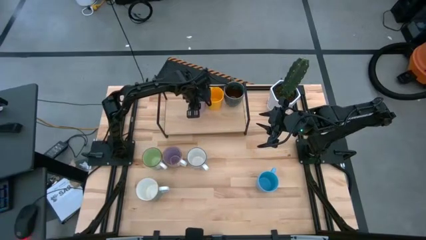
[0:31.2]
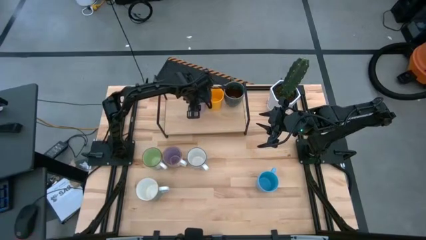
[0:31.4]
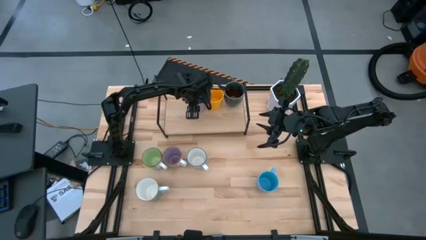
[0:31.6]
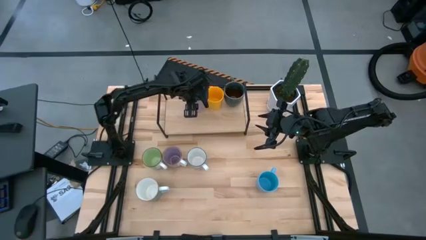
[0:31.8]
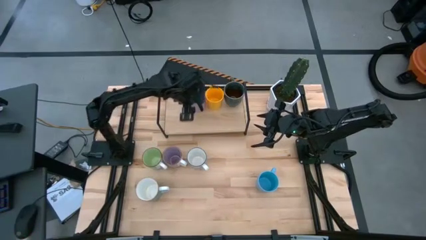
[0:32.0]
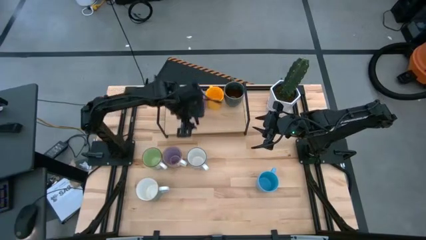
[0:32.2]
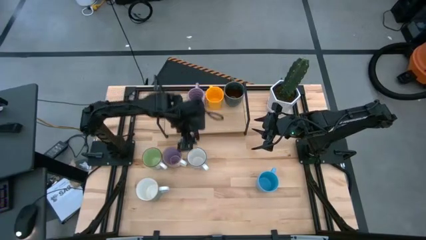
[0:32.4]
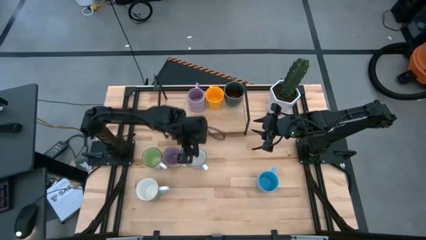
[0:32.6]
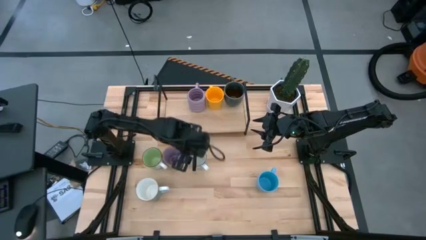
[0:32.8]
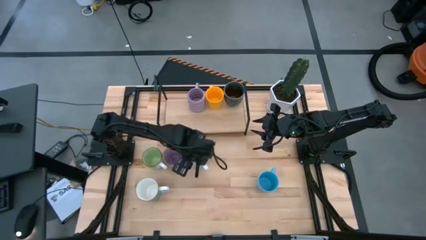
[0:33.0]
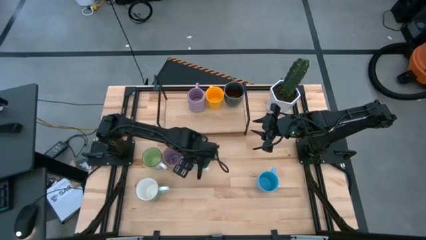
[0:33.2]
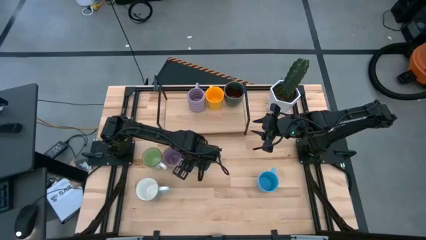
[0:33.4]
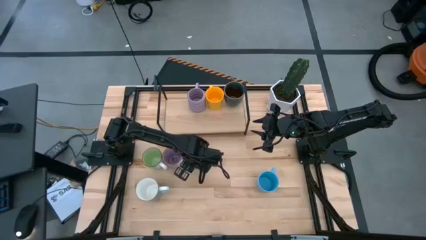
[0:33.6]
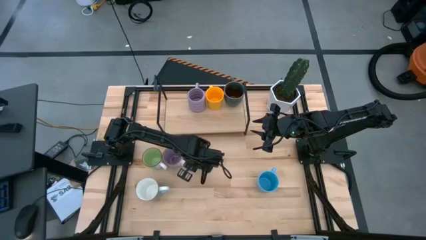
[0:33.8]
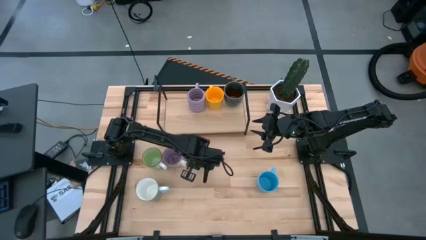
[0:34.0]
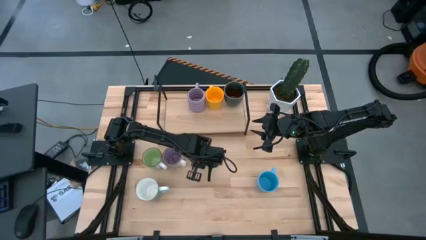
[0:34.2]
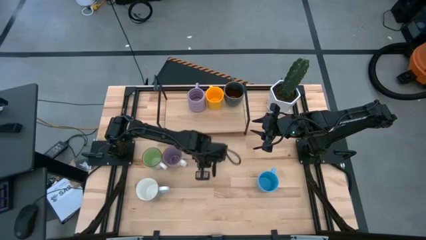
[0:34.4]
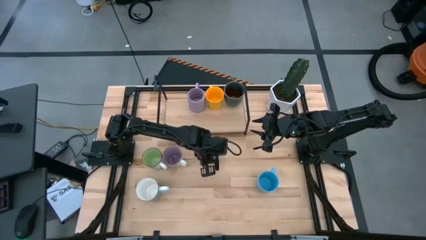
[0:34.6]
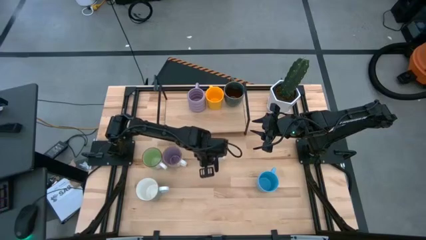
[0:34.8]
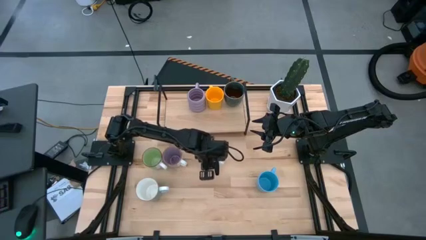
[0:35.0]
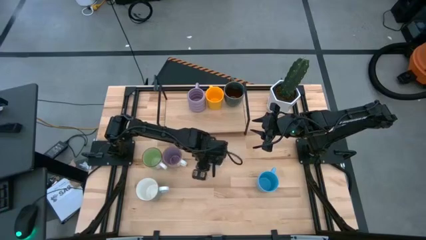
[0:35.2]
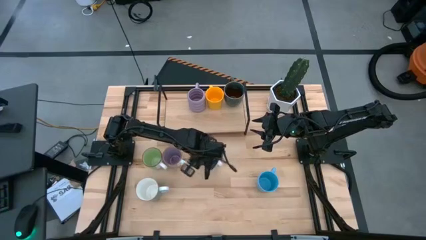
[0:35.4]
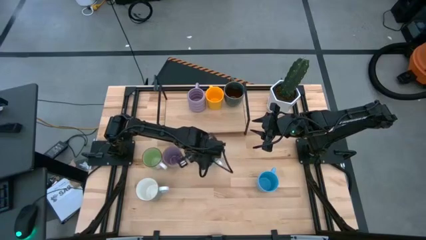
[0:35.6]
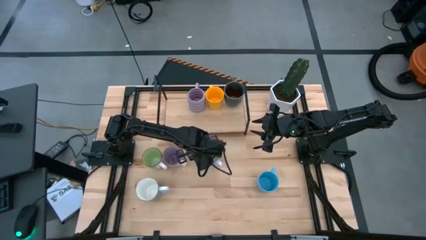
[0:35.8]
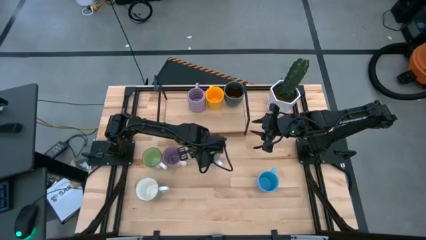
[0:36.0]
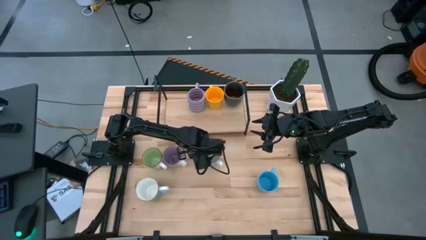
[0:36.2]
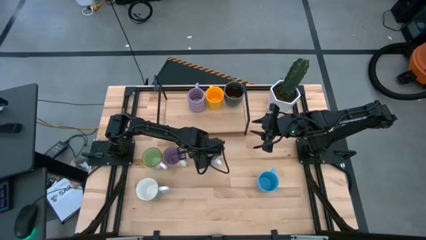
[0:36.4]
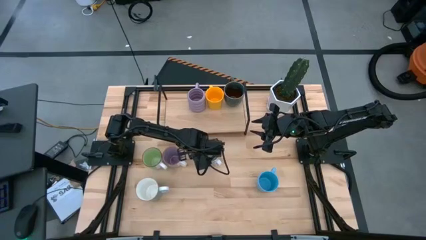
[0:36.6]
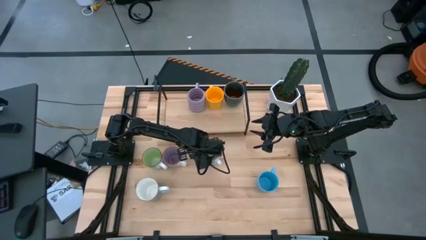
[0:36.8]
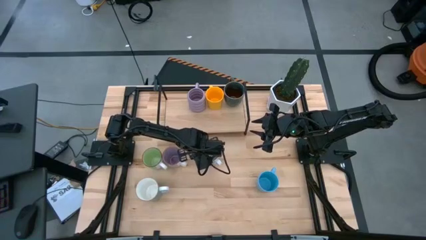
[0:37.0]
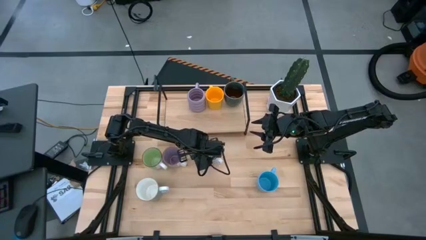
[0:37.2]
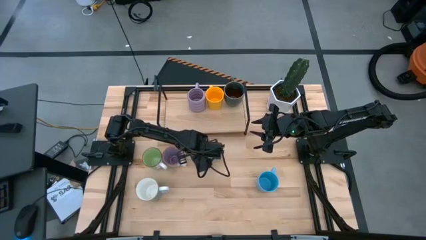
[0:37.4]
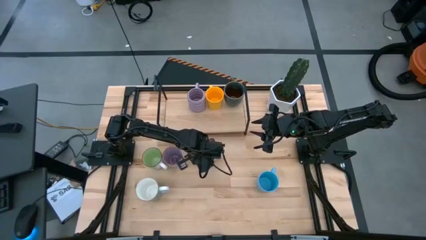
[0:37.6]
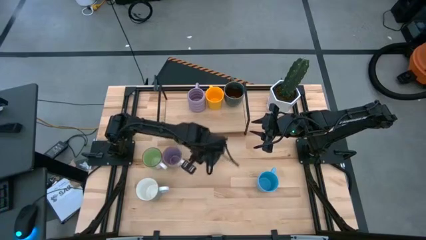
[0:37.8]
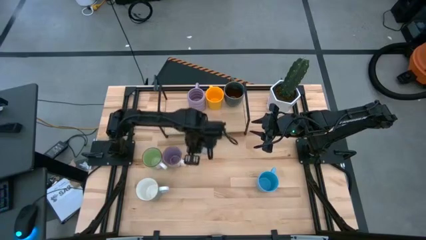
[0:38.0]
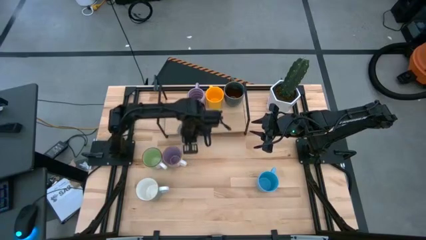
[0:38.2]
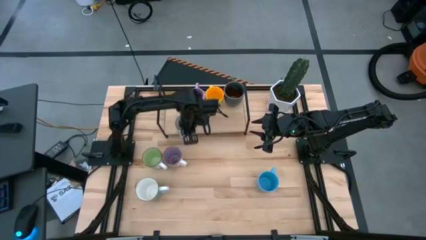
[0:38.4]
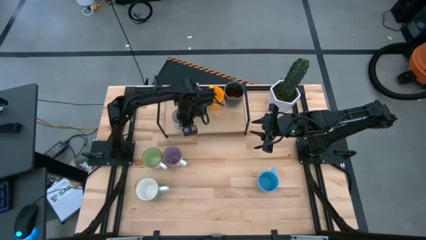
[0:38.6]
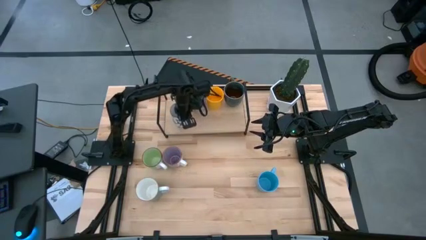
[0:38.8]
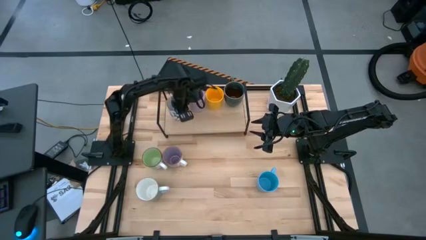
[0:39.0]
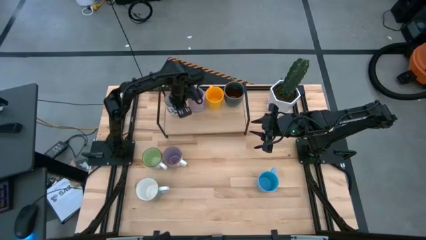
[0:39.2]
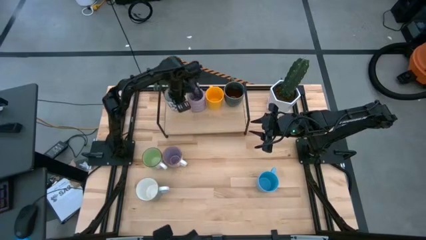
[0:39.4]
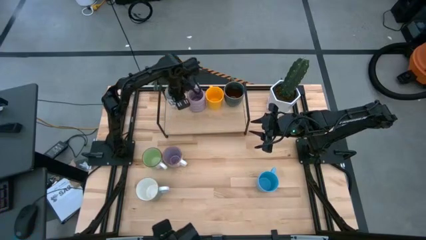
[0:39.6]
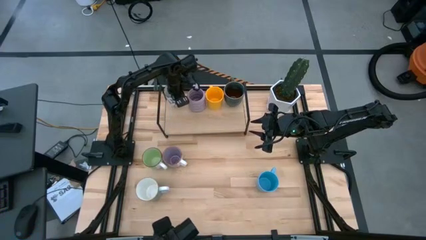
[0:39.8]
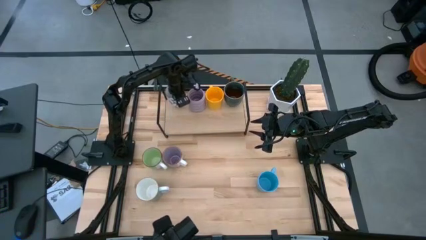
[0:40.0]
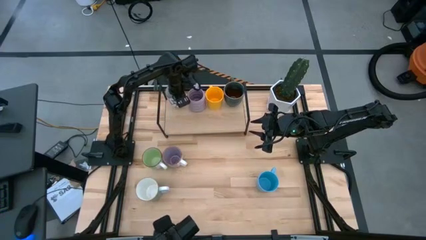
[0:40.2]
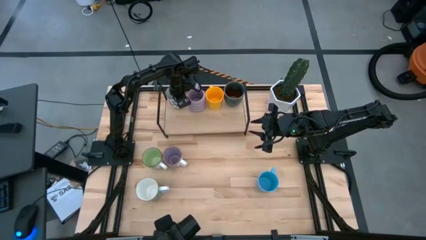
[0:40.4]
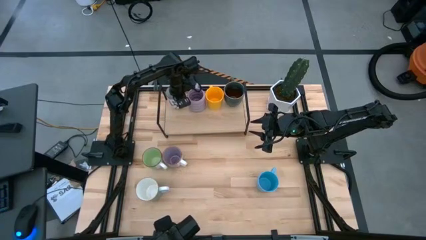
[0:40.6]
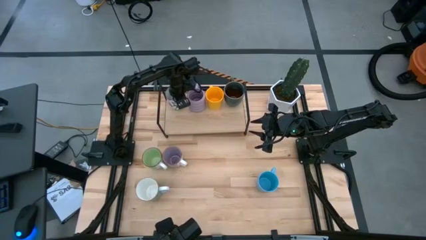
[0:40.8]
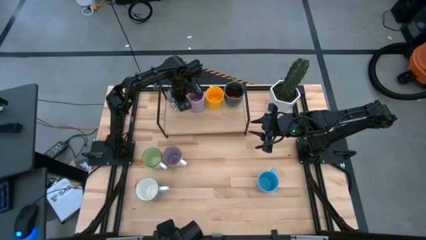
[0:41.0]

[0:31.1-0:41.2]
Task: Place coffee mugs
Put the blue and white printed mug on the shelf

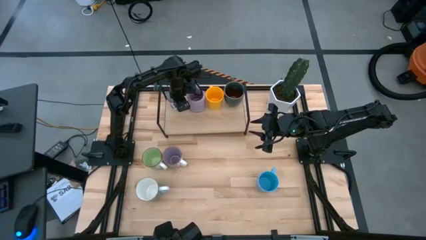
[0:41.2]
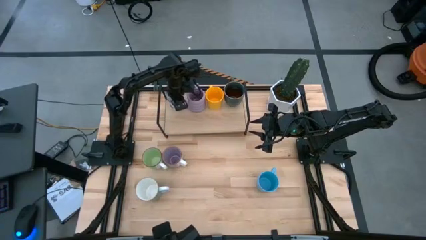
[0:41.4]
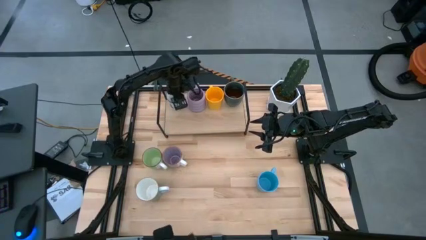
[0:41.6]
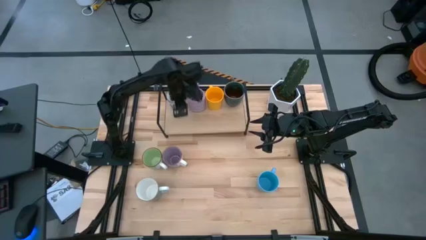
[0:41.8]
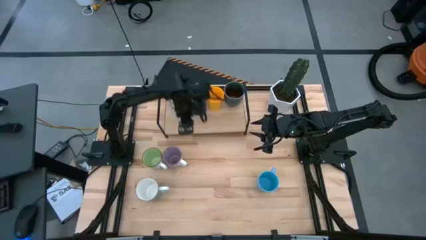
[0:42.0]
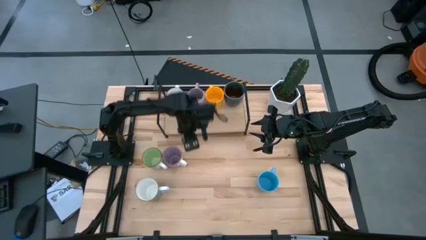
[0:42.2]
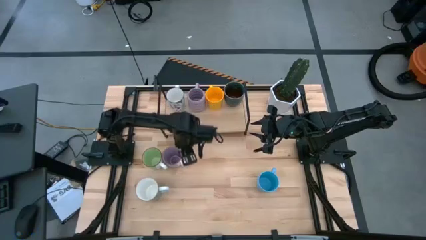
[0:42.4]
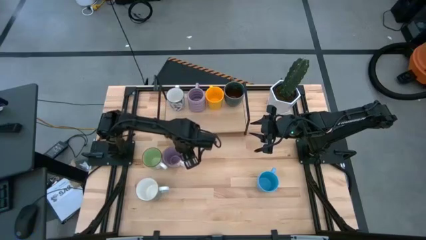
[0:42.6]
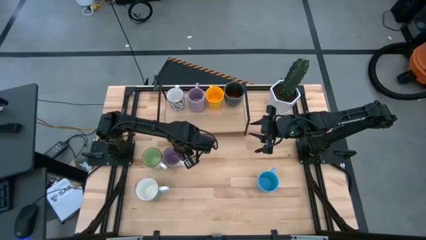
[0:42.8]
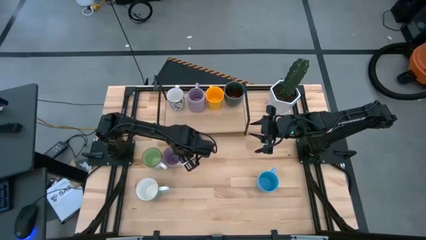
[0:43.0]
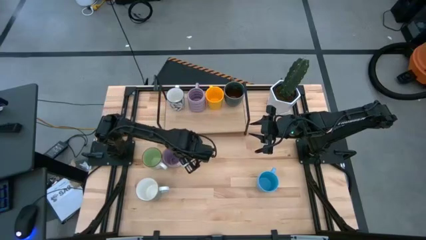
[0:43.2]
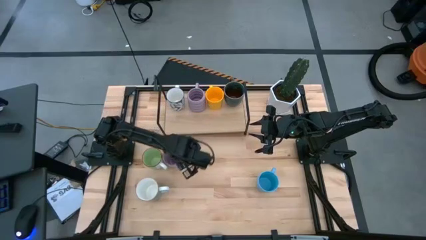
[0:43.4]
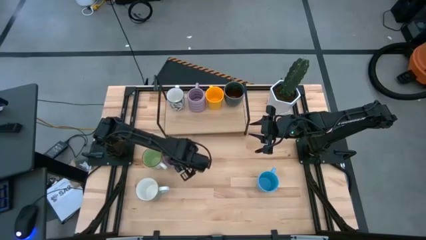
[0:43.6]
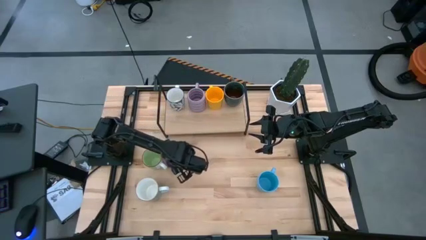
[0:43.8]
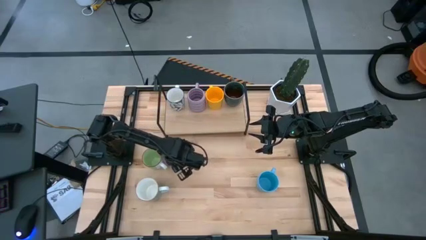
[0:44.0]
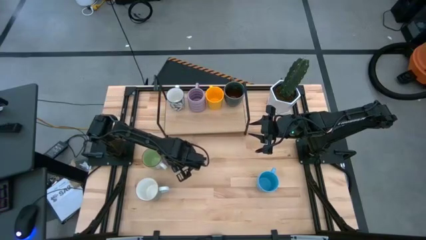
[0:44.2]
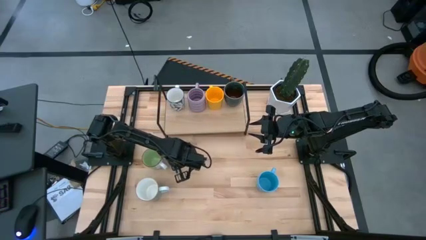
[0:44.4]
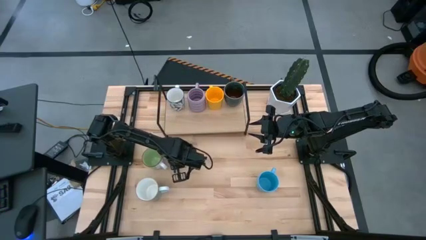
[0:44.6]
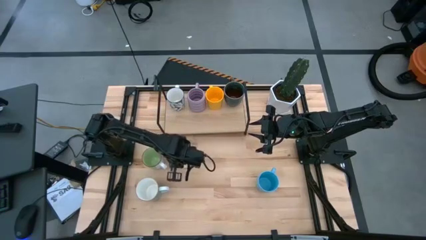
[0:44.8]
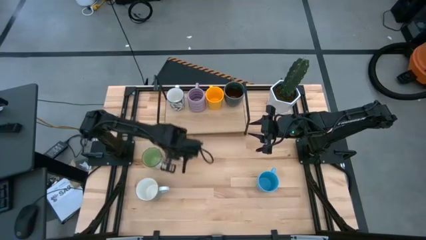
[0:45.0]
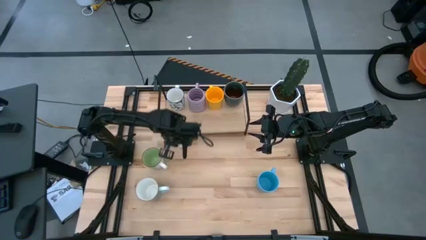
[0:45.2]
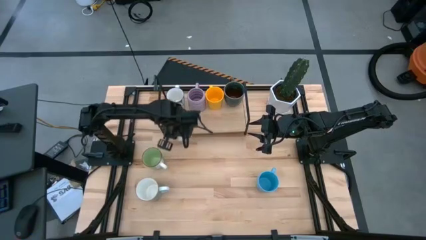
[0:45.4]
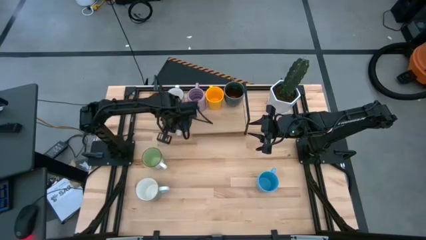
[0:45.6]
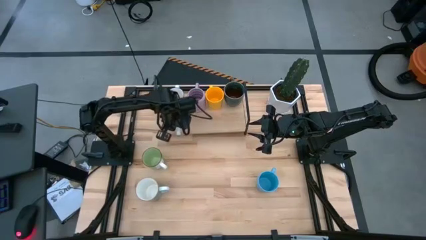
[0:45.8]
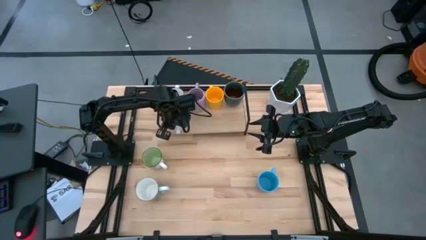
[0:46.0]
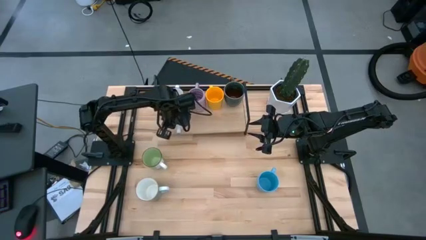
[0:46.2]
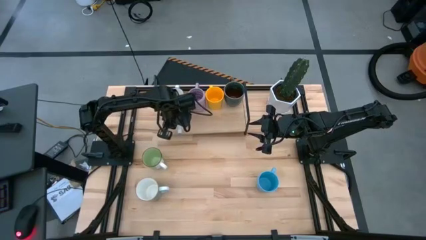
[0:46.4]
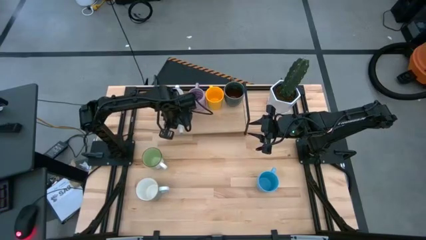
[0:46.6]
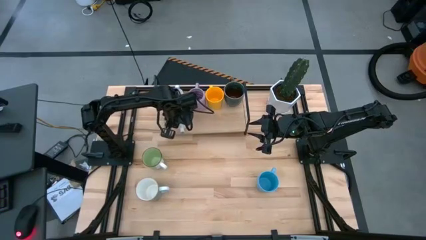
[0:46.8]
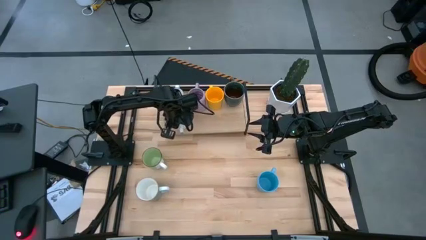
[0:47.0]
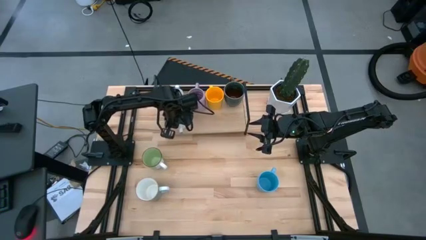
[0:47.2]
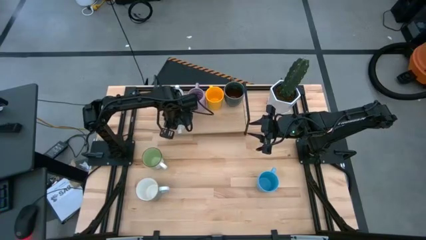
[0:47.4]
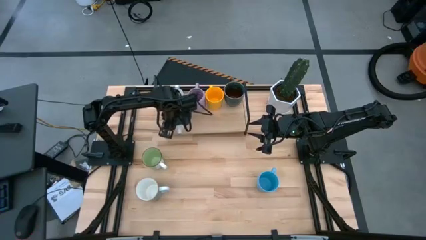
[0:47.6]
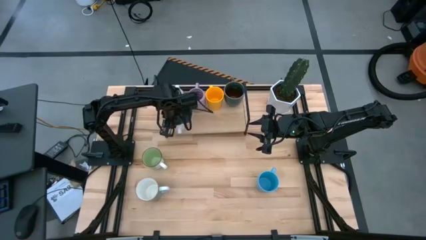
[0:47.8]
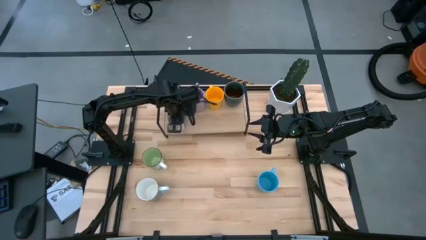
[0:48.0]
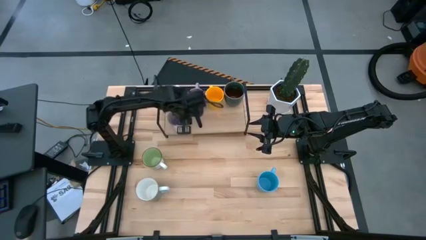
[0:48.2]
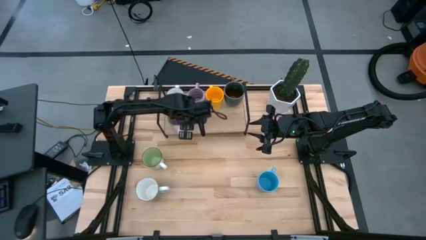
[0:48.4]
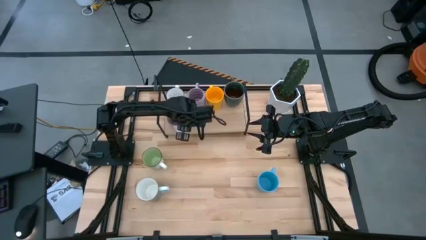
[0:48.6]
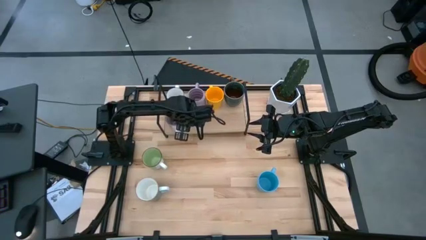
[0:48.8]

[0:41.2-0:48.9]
Put the purple and white mug on the shelf
